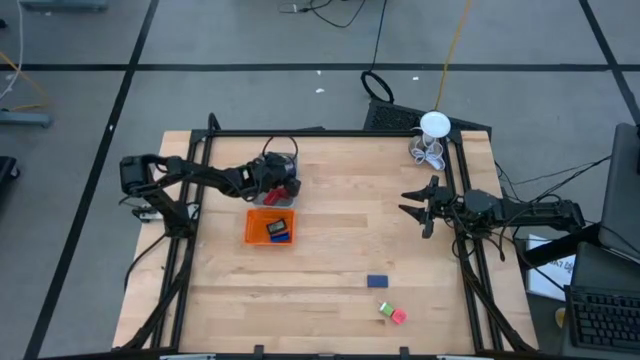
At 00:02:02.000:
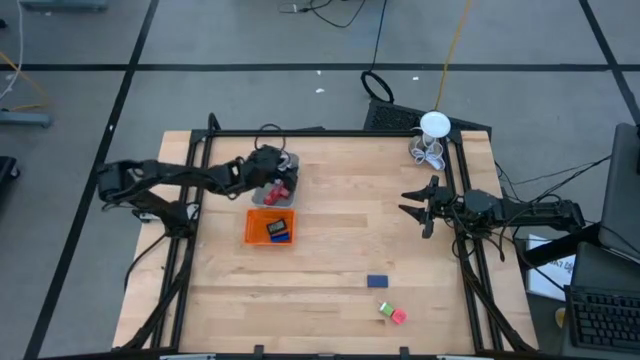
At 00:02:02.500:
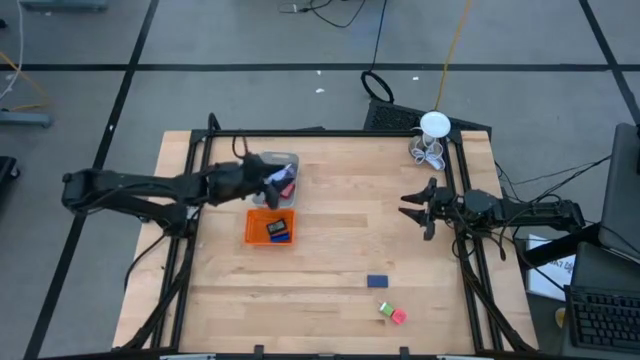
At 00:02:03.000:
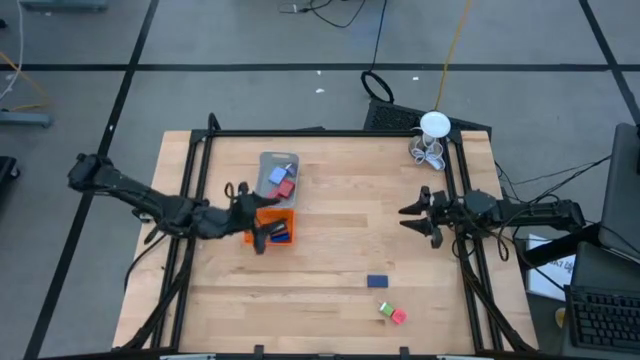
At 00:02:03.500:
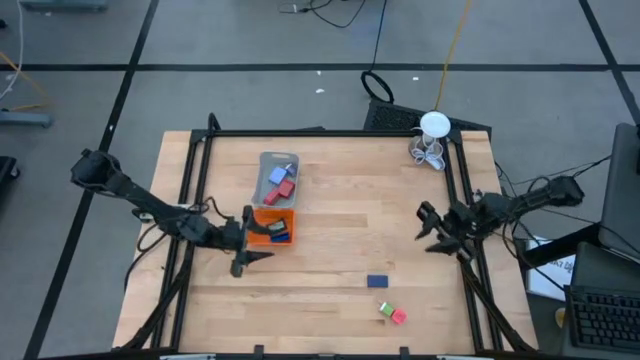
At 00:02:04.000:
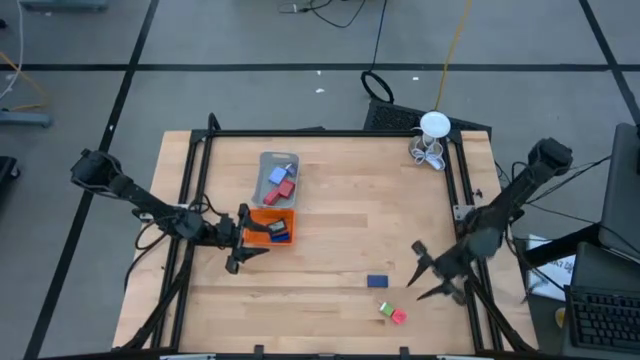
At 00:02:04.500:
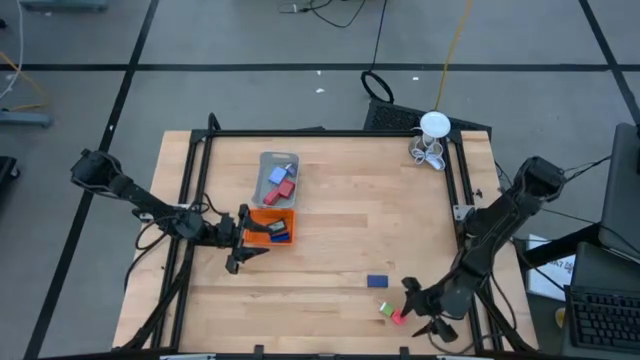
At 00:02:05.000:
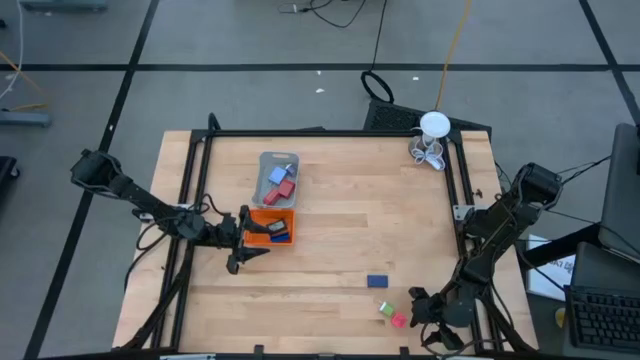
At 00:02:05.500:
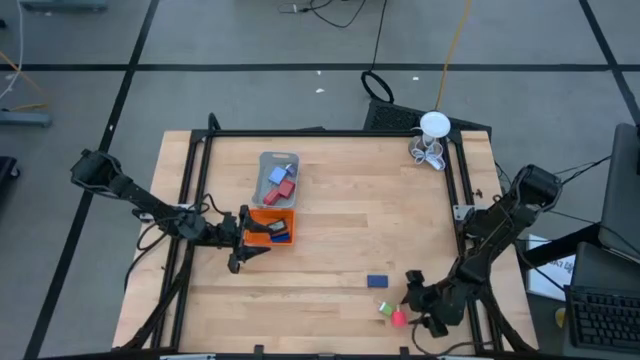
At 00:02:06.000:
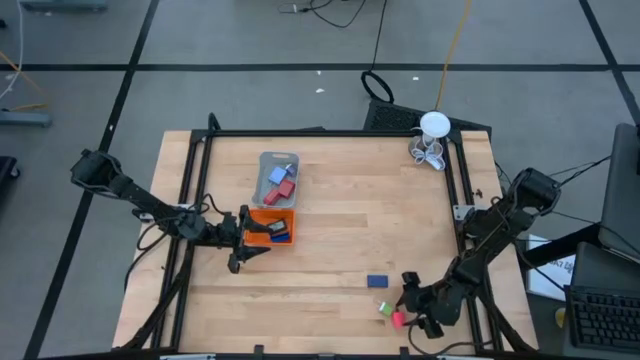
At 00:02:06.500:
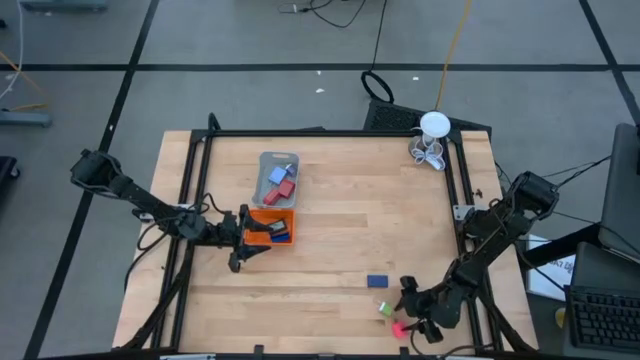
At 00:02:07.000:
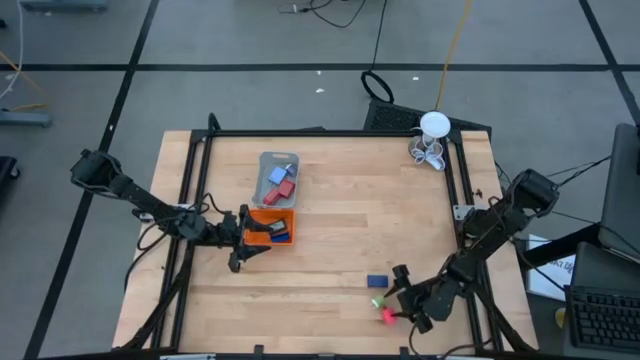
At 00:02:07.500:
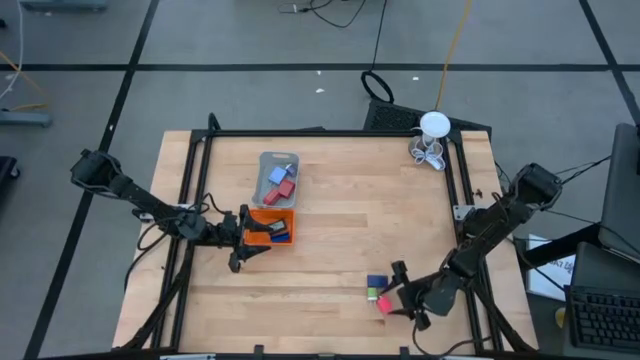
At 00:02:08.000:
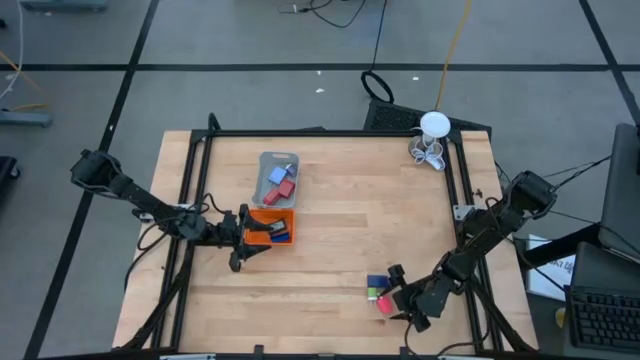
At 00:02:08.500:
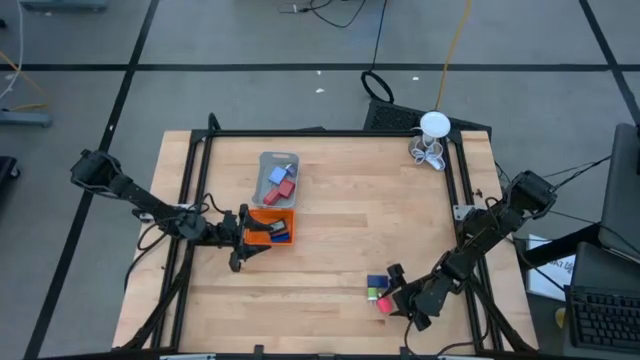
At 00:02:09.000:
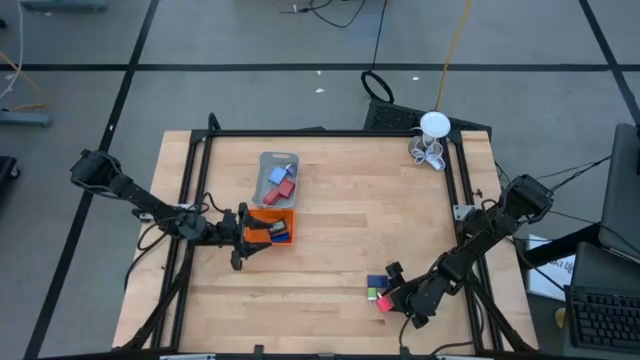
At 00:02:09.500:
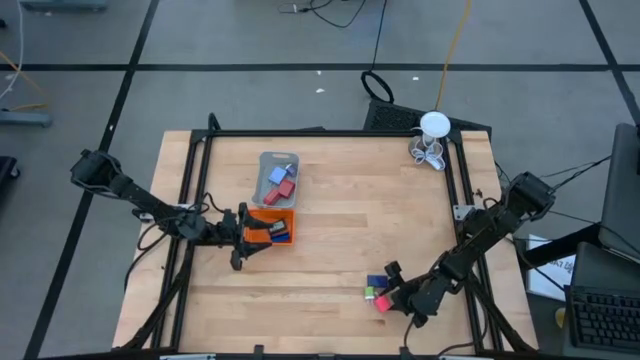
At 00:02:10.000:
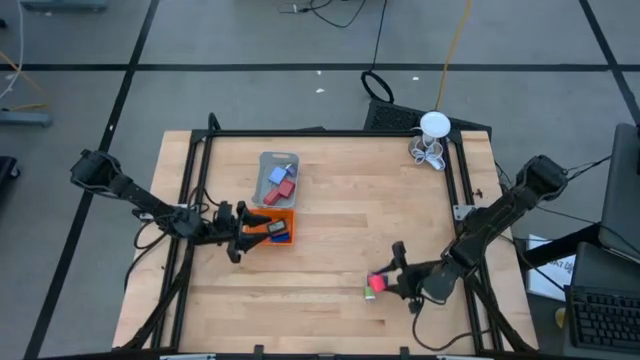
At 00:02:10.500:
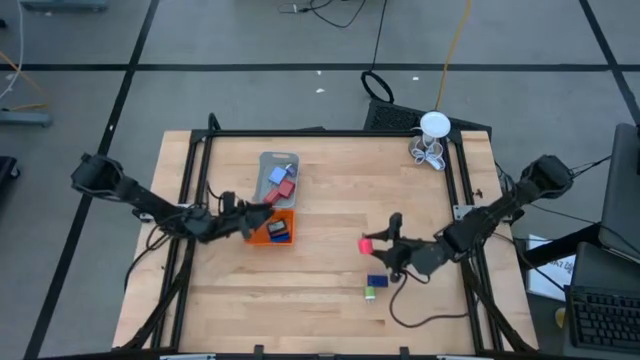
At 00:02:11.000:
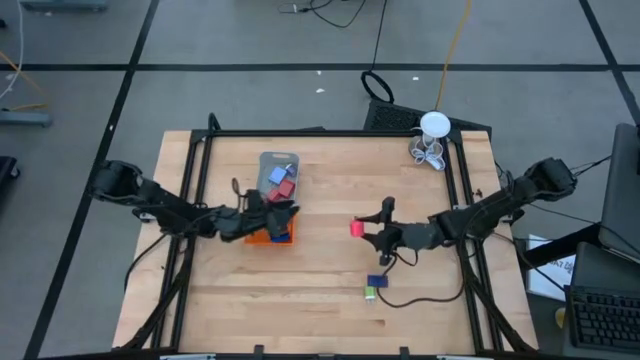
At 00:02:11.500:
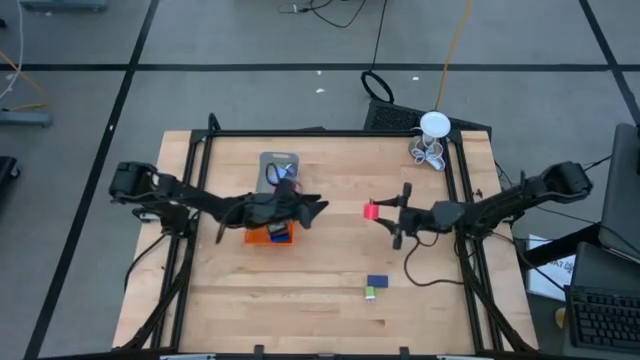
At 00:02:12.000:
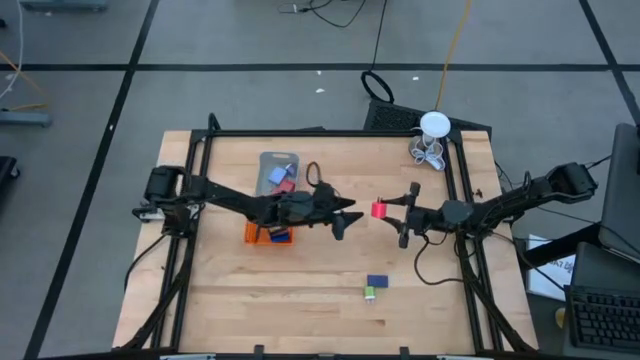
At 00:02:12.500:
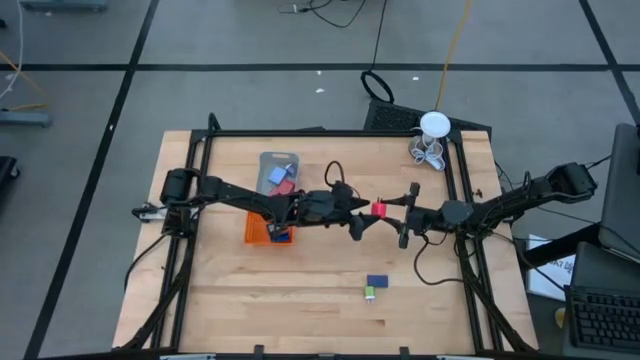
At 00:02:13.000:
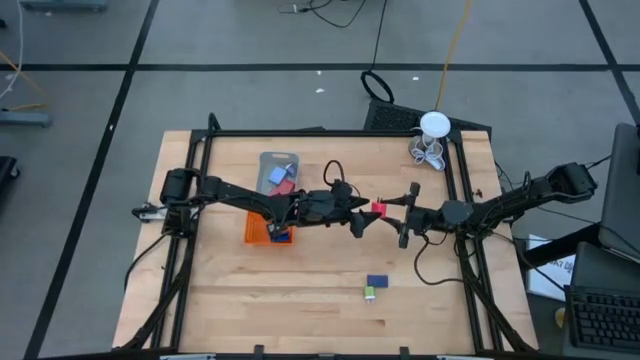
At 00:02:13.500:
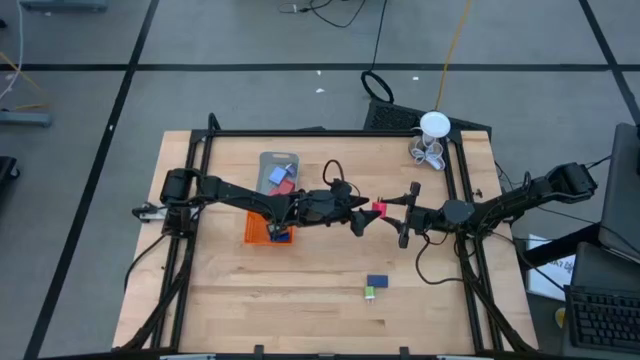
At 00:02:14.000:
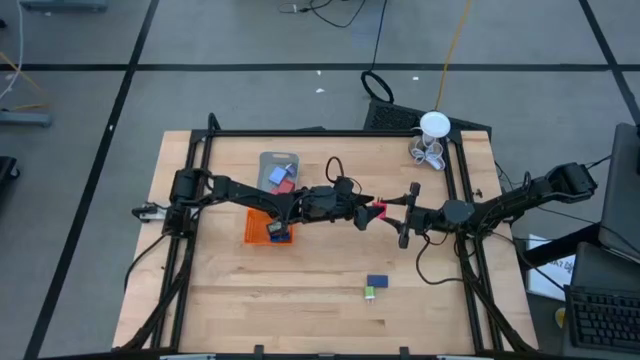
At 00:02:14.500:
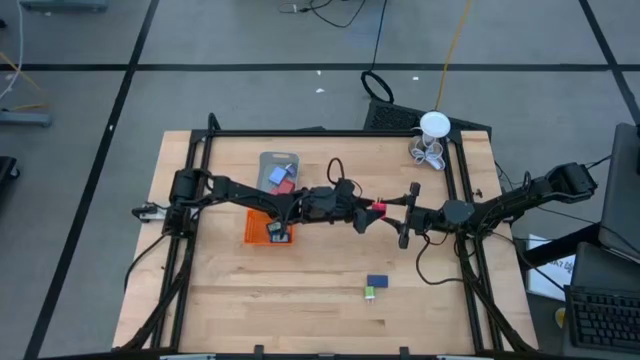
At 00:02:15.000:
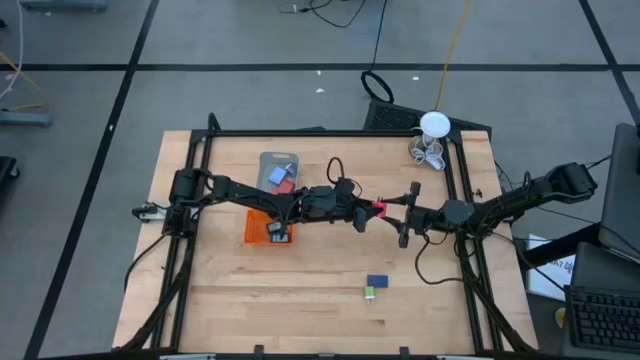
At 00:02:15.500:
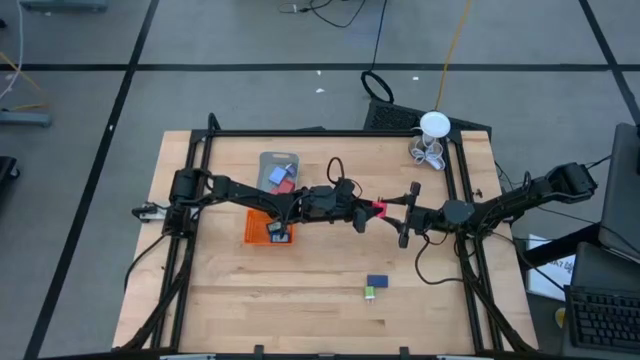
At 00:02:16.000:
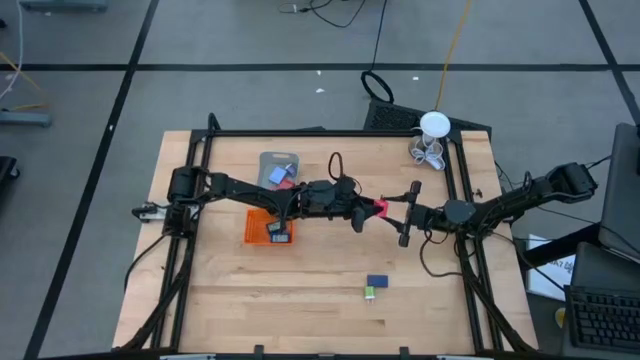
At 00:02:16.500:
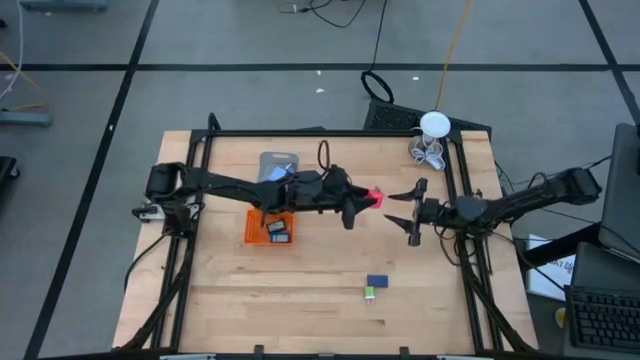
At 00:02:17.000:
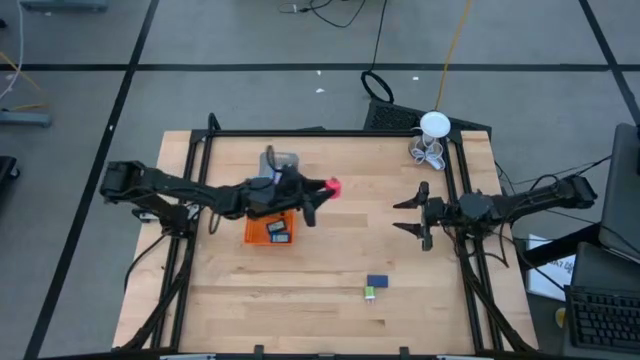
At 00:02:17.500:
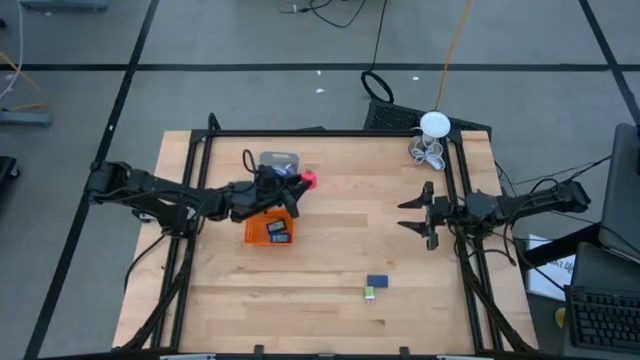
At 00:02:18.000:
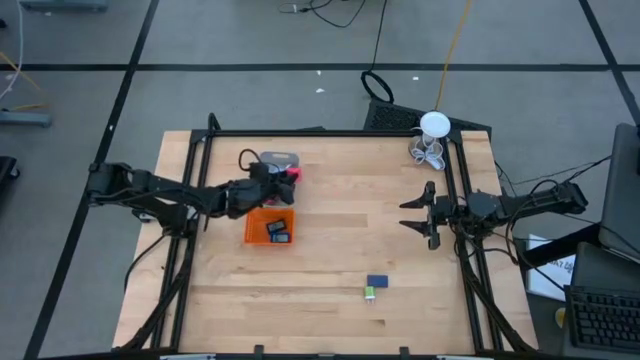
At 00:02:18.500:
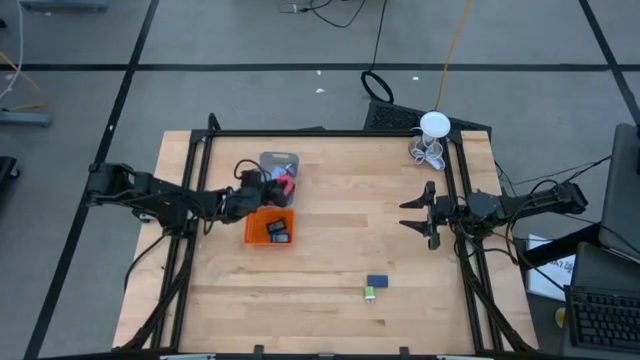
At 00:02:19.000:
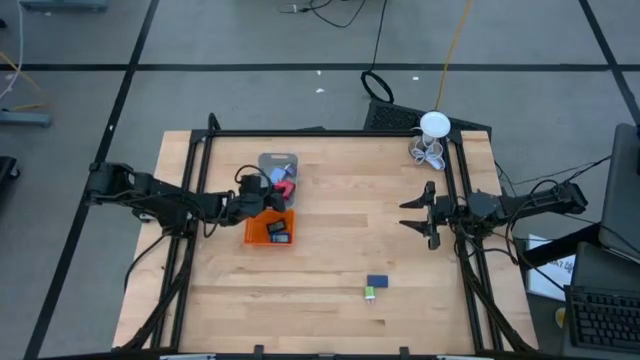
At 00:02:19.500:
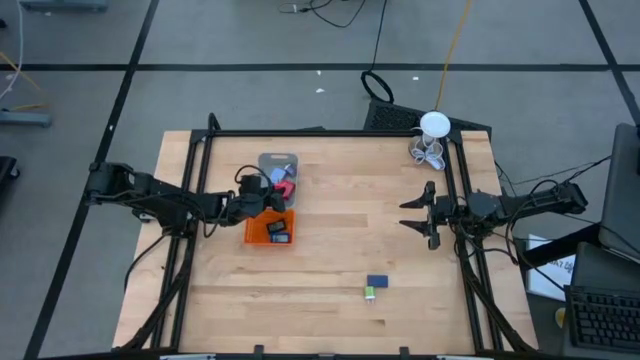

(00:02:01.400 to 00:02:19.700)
Task: Pick & Place Office items
Put the pink charger adapter into the gray bin

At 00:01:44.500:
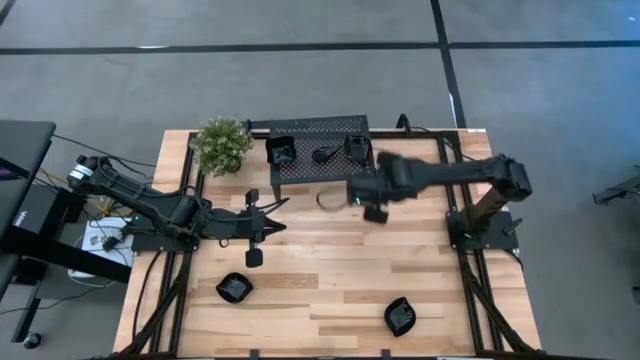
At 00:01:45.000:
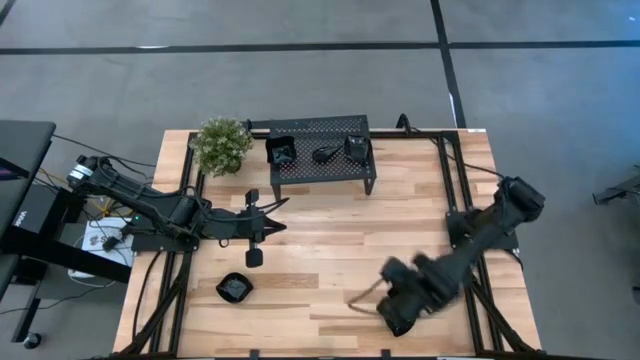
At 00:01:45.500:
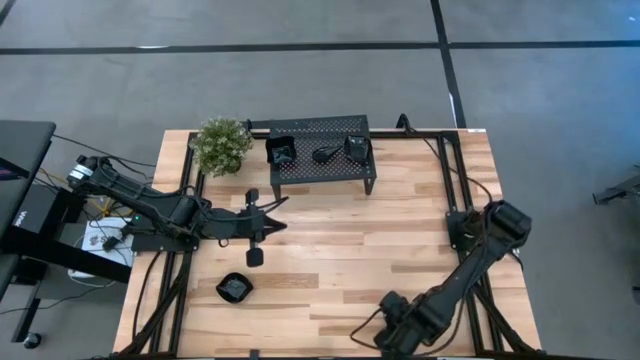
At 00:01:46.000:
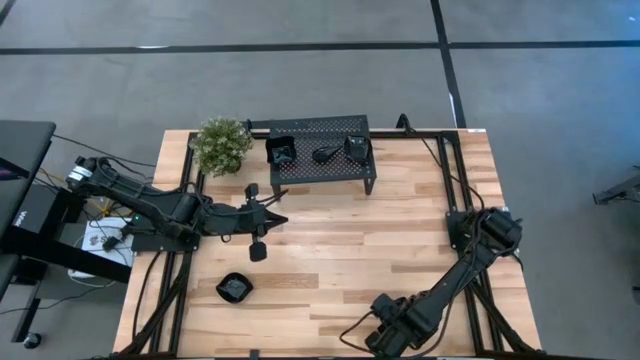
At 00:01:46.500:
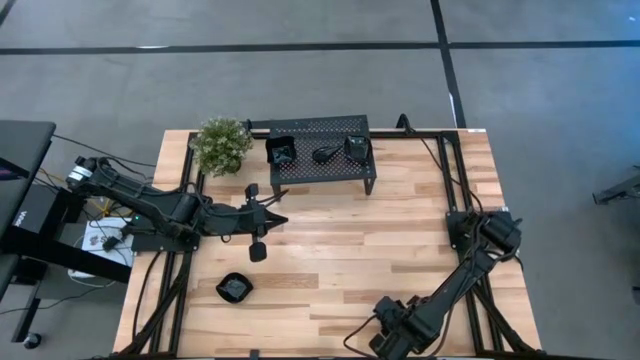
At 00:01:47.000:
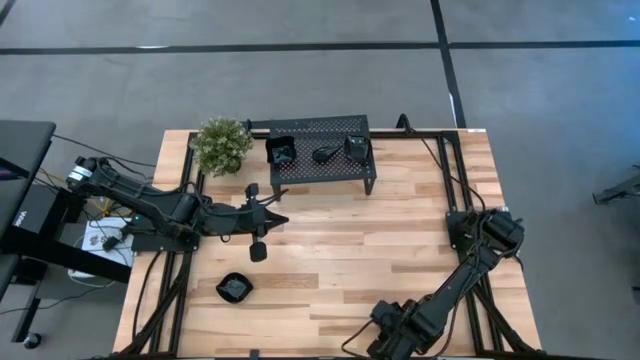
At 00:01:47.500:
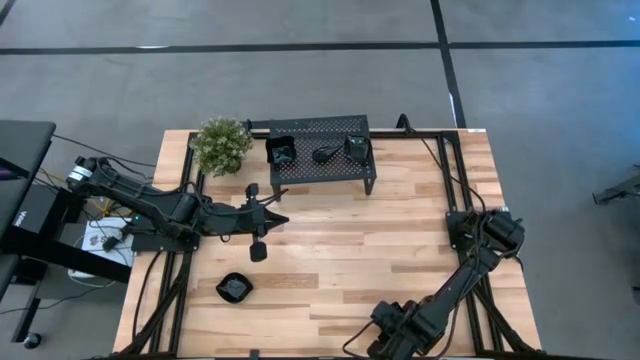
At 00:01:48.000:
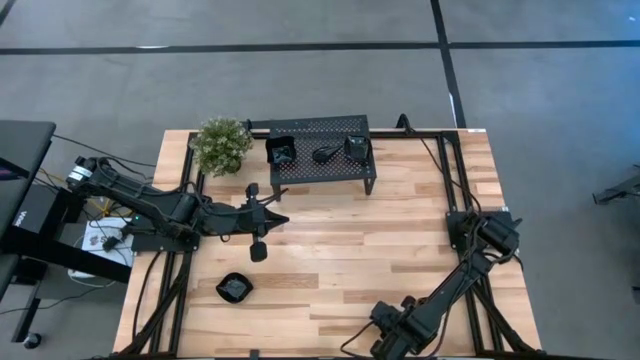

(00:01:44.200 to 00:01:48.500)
Task: Pick & Place Mini shaped plates
Stack the leaf shaped plate on top of the leaf shaped plates on the shelf
